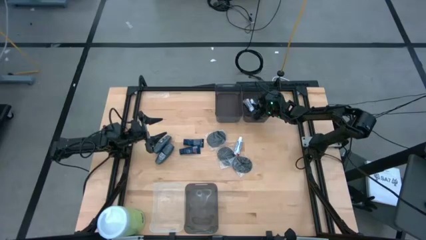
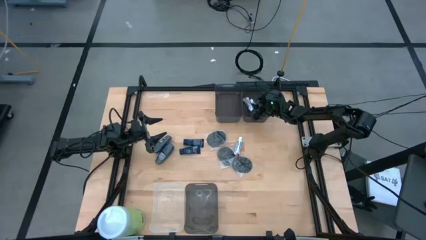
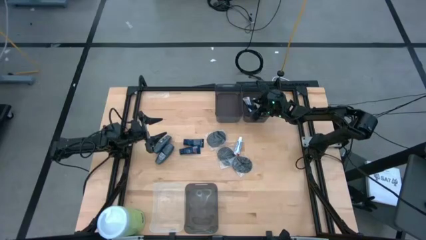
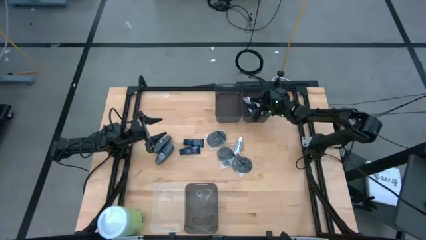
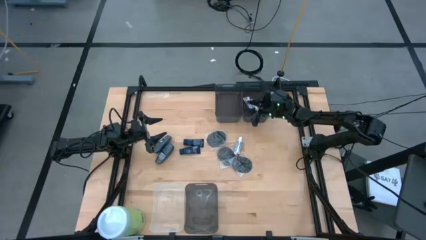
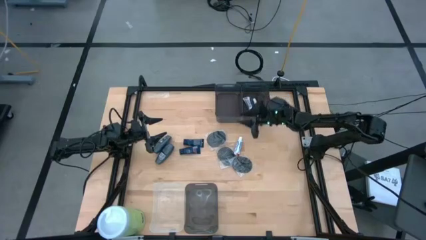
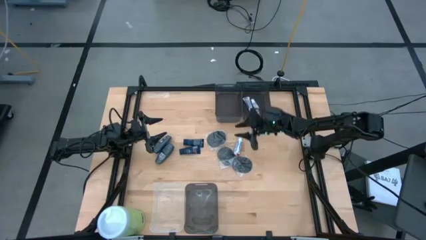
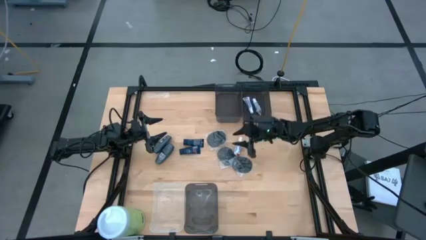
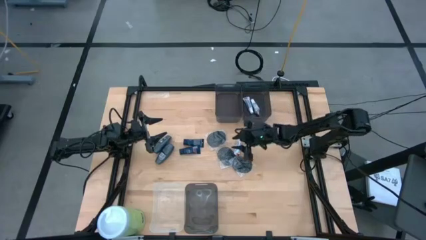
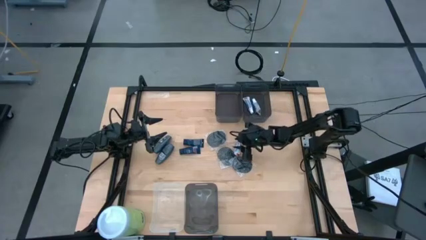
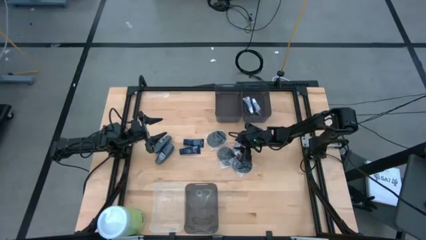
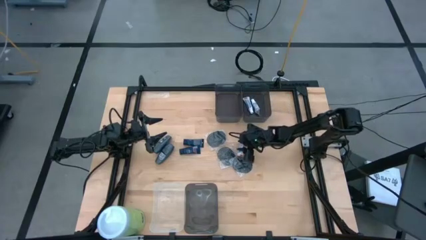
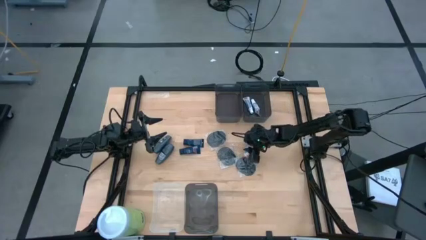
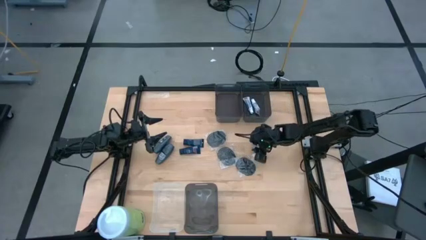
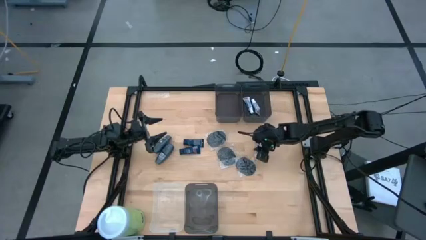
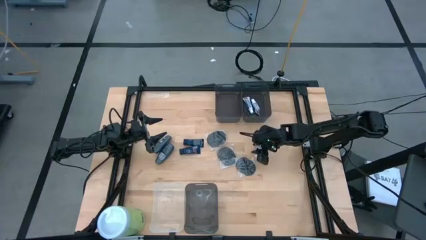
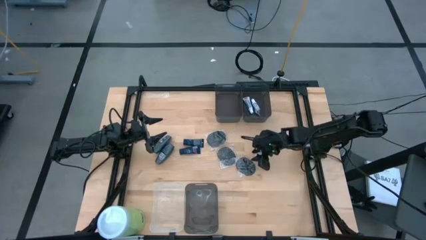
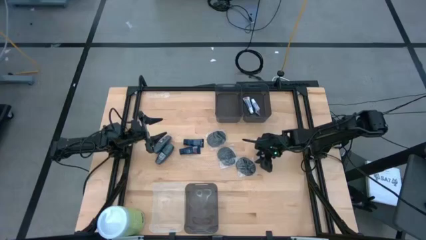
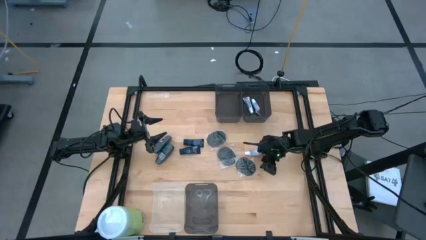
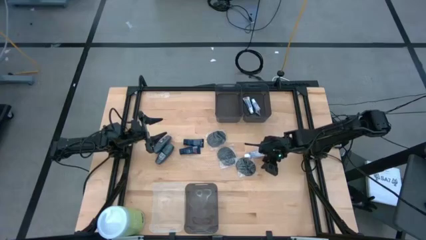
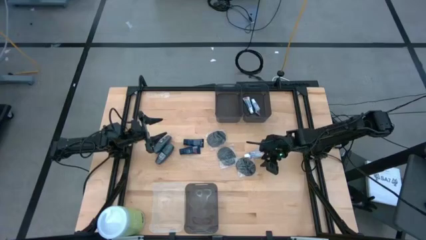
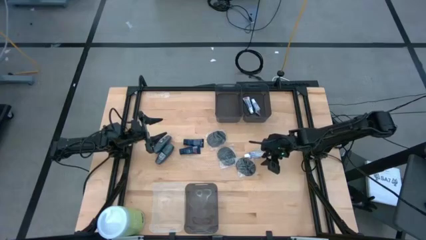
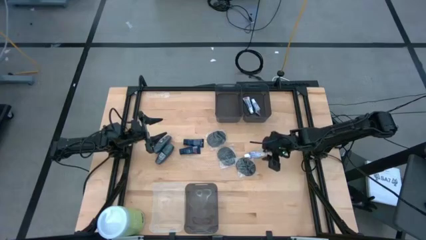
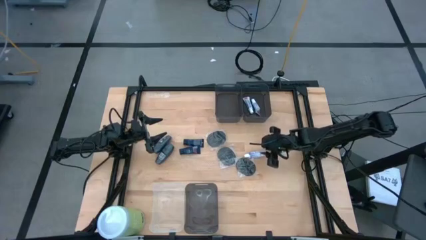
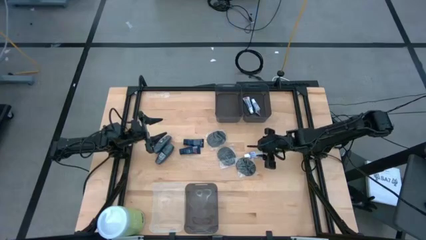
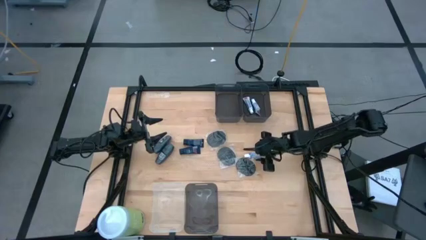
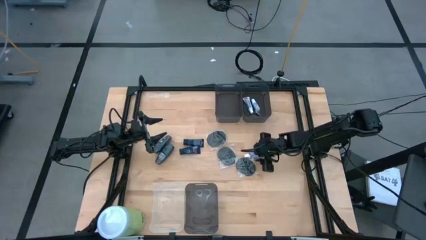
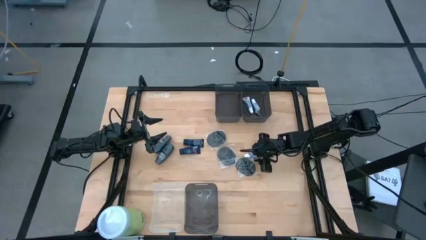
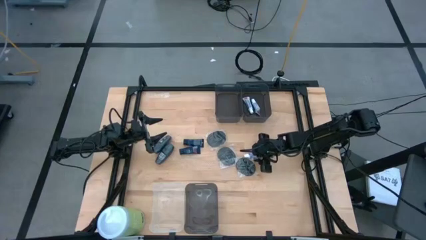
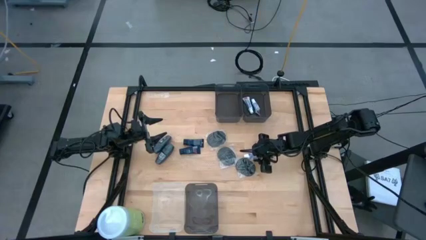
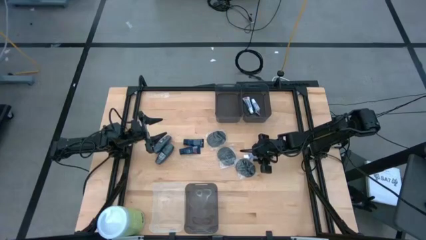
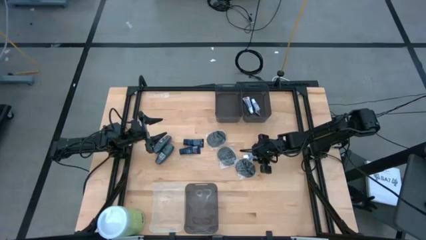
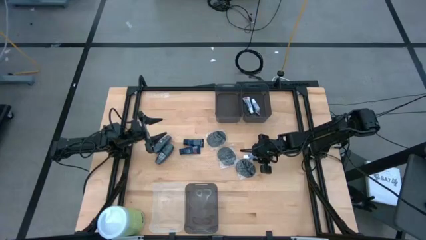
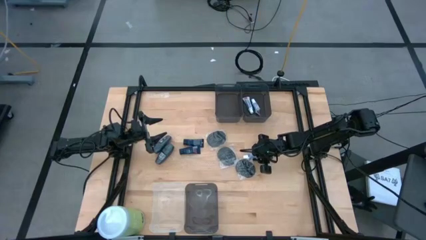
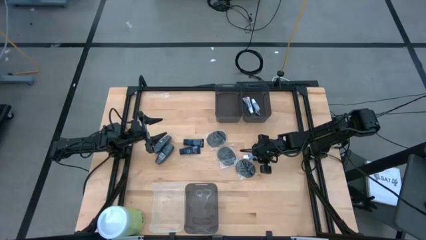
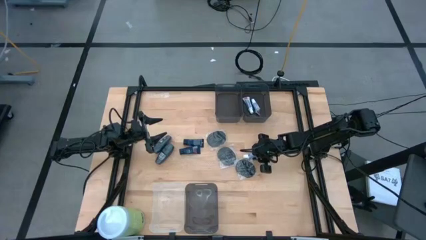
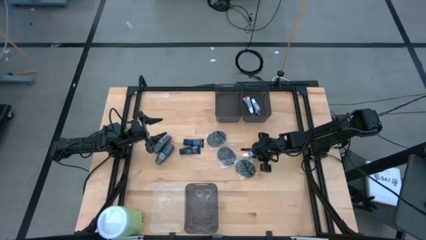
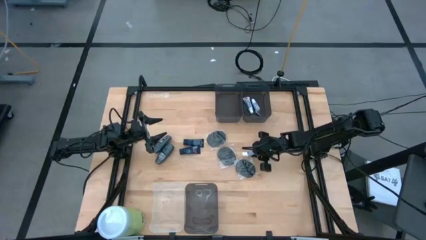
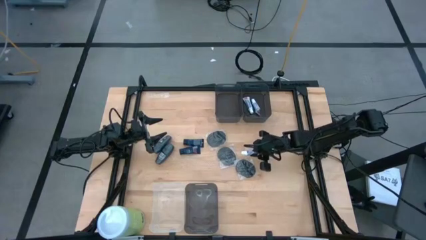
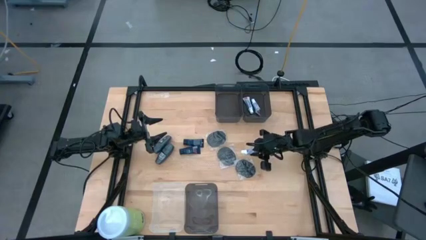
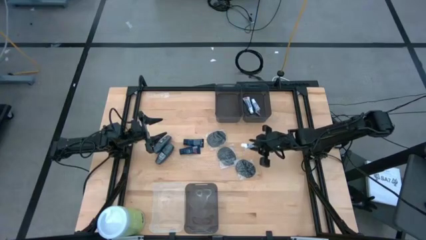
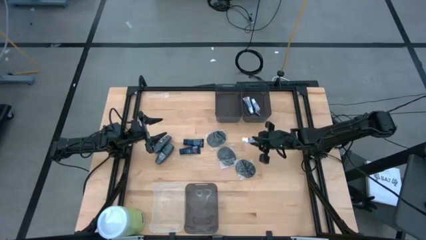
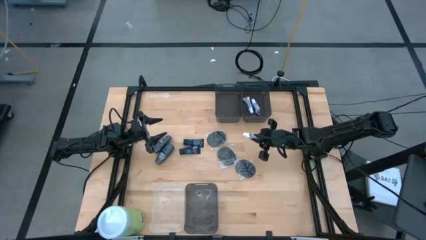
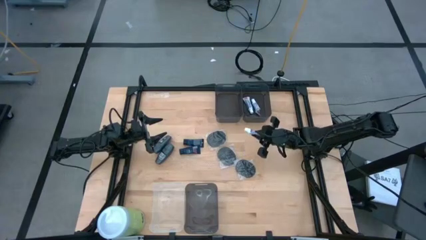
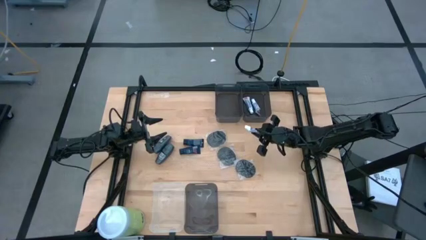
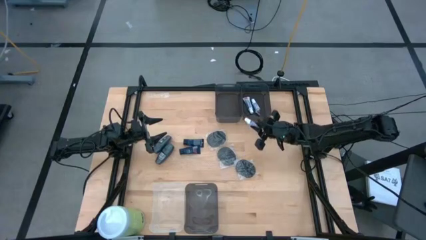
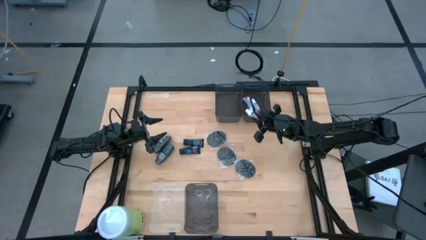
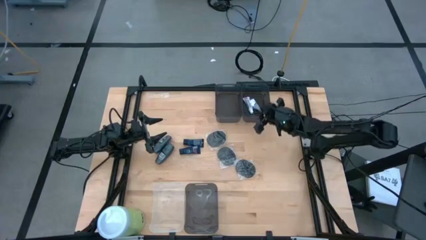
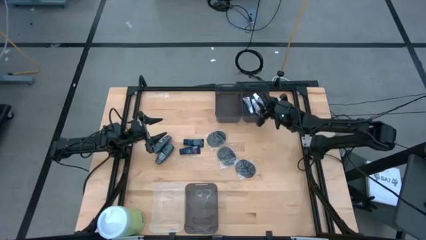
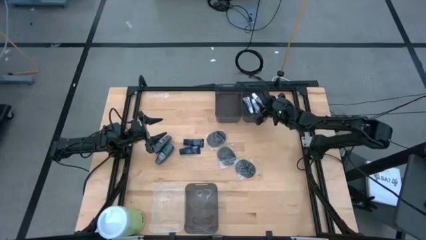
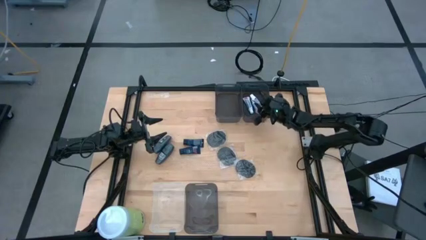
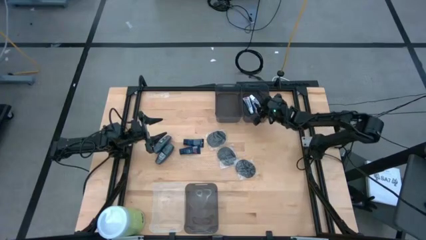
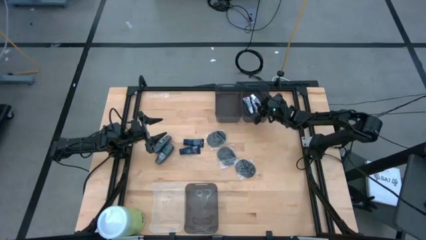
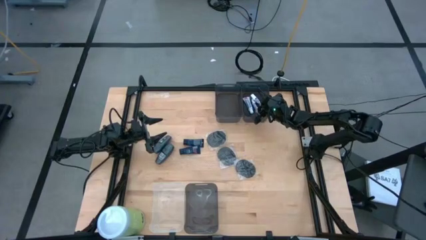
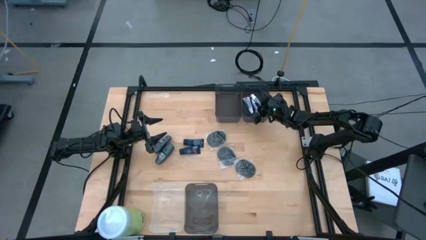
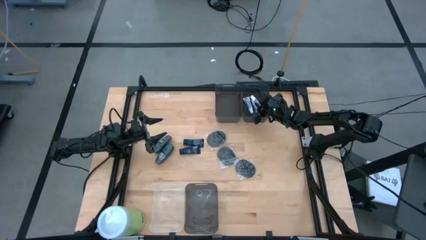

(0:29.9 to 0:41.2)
Task: Pick & Place Travel size toiletries
Put the toothpaste into the top right black bin

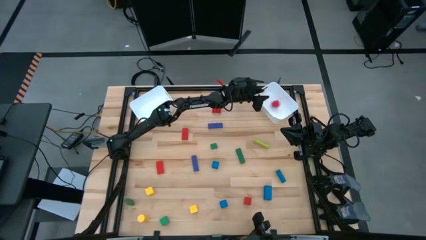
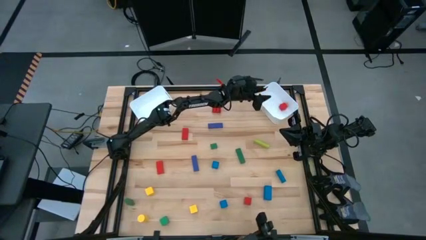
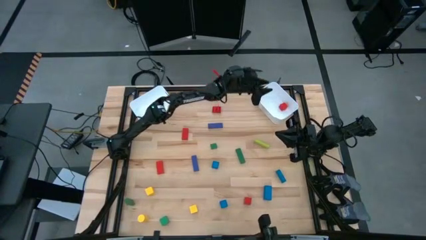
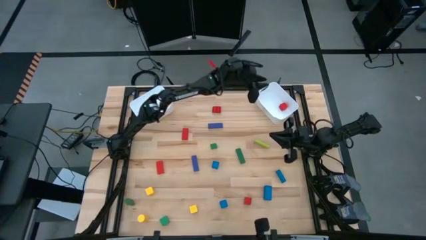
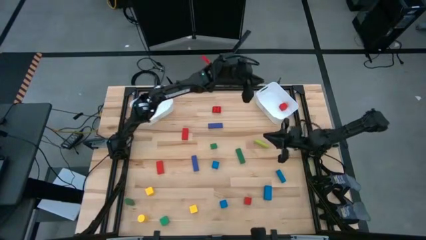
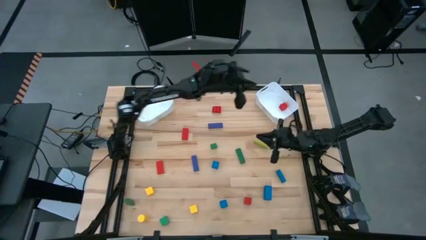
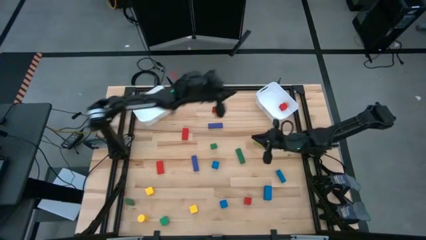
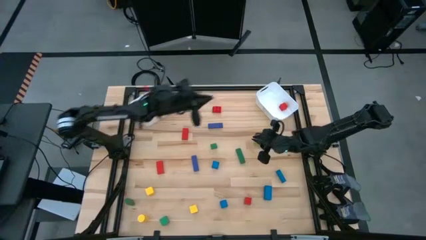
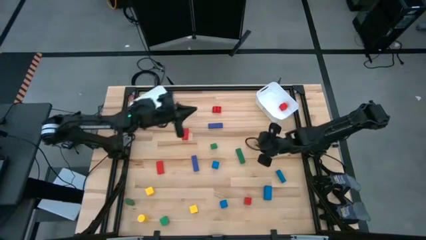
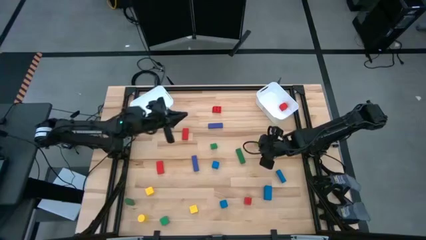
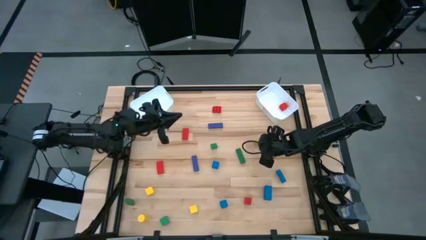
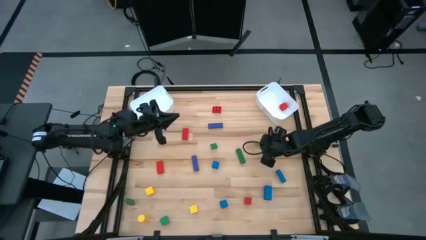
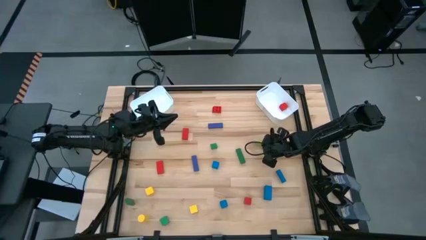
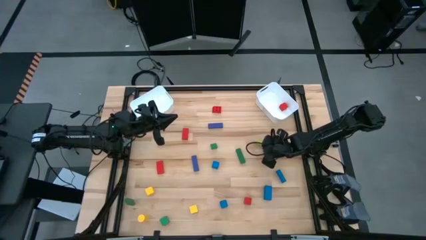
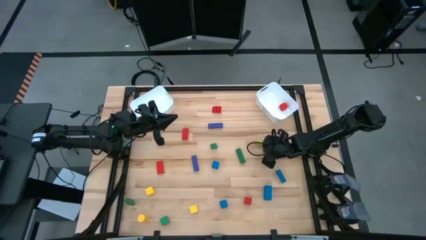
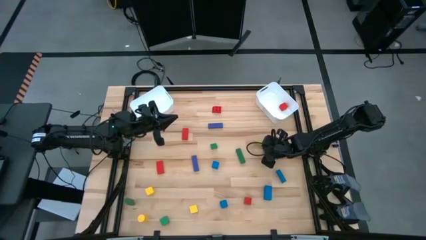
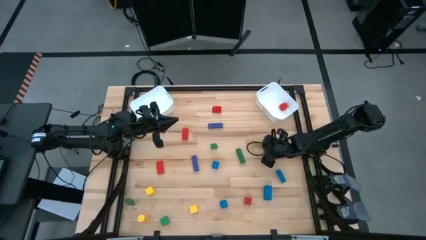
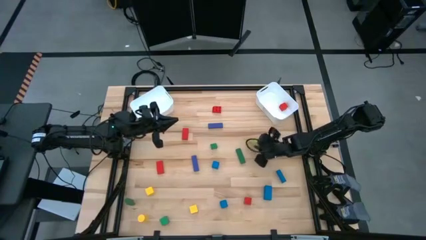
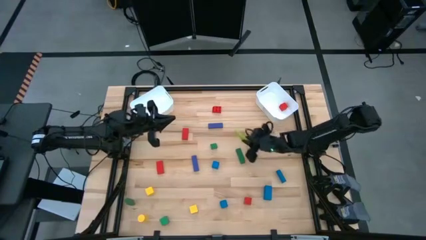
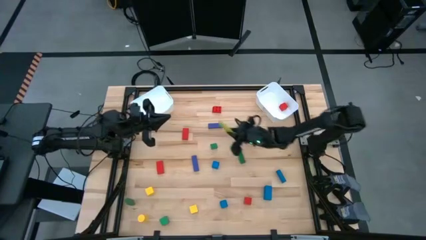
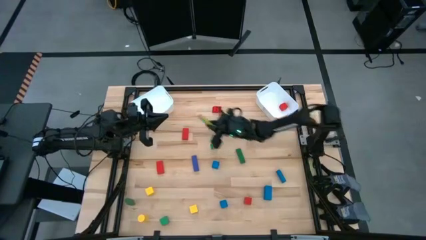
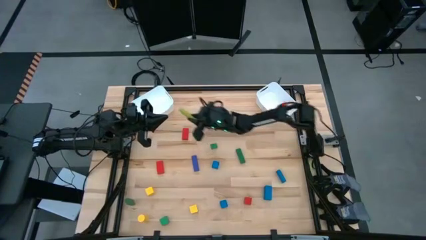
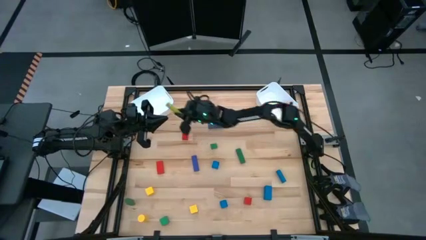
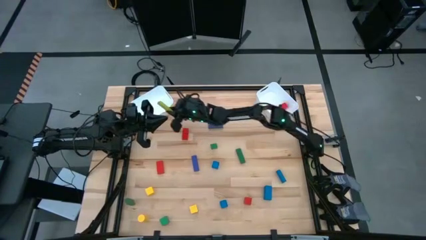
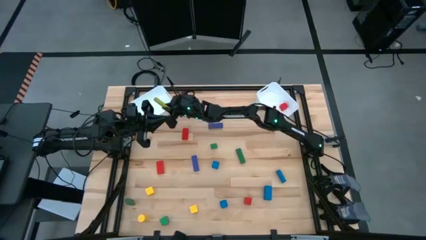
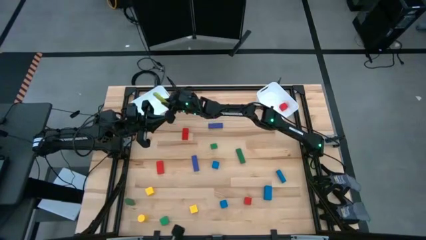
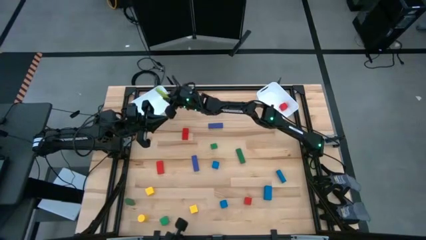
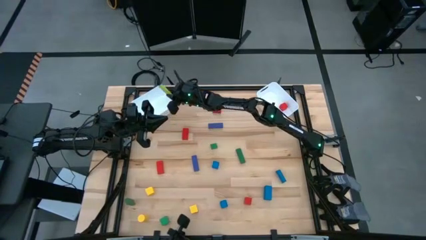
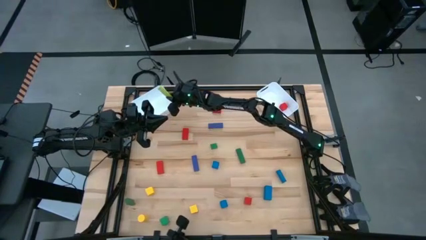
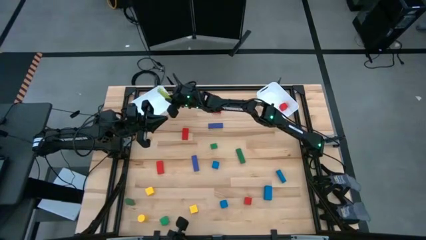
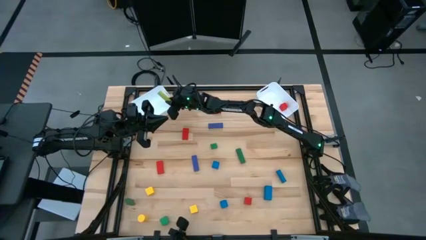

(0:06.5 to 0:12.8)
Task: Sort blocks by size
Put the large light green block into the left white bin
